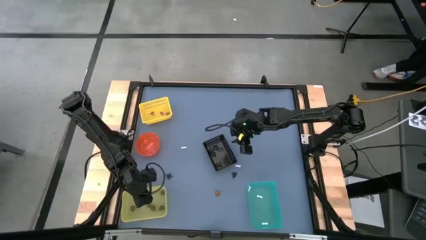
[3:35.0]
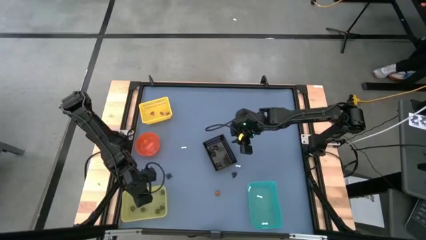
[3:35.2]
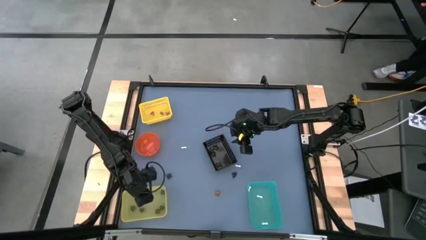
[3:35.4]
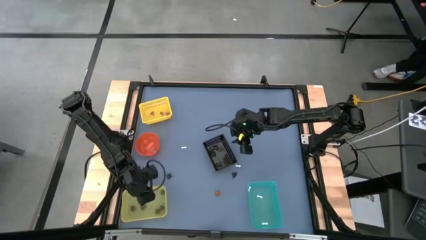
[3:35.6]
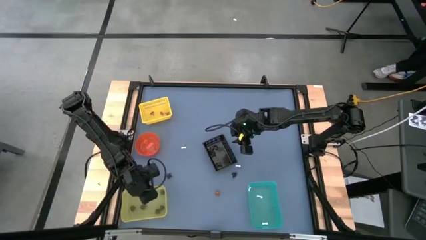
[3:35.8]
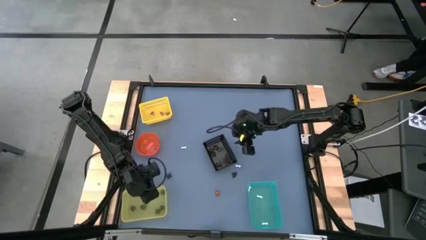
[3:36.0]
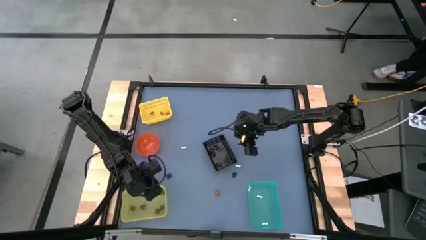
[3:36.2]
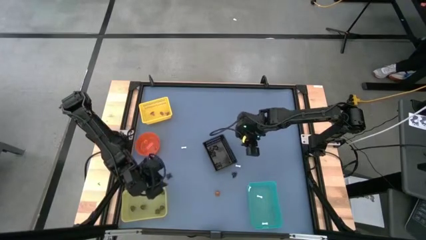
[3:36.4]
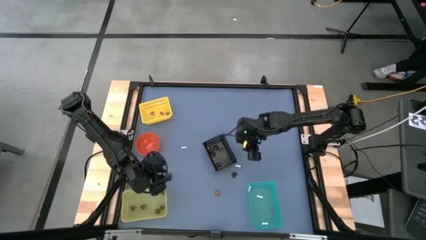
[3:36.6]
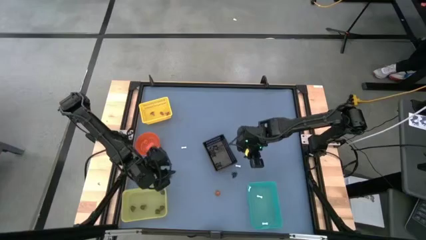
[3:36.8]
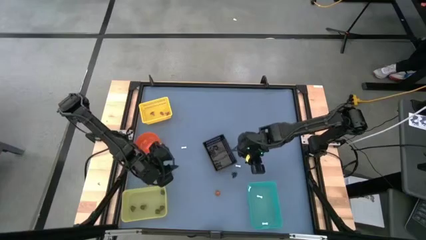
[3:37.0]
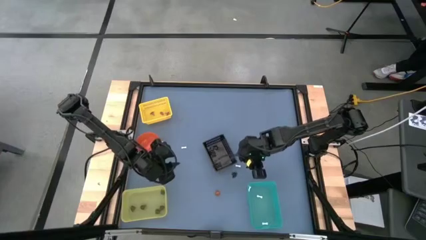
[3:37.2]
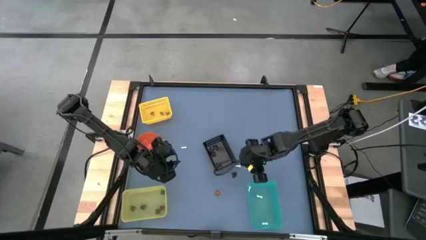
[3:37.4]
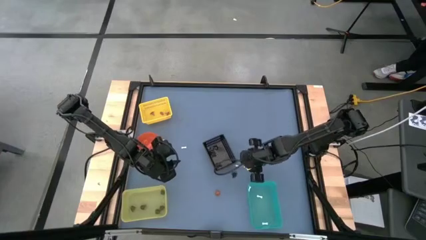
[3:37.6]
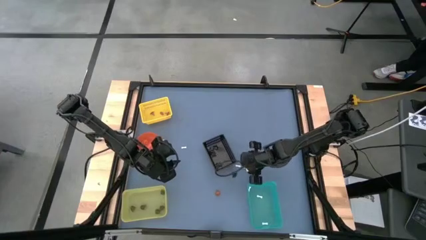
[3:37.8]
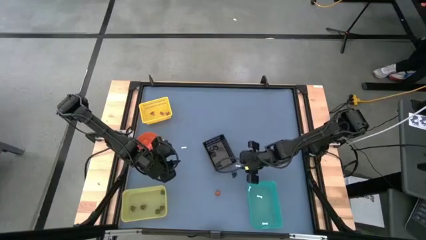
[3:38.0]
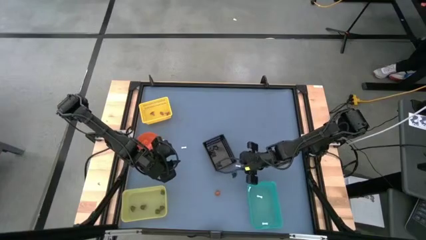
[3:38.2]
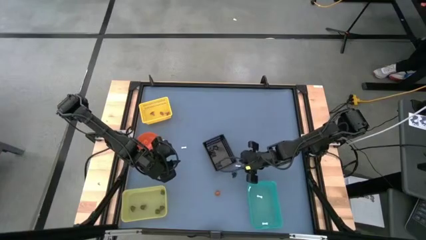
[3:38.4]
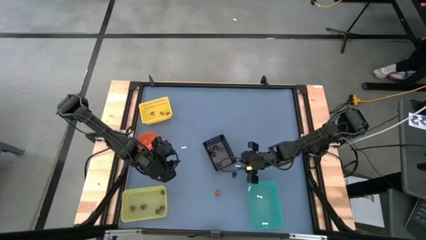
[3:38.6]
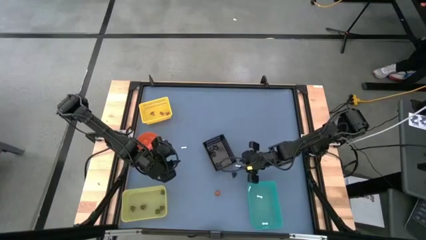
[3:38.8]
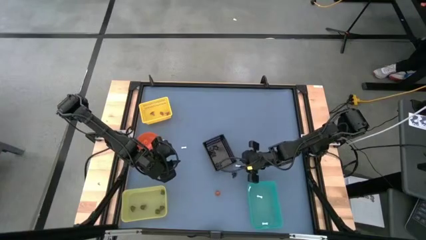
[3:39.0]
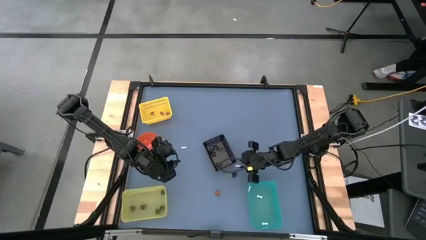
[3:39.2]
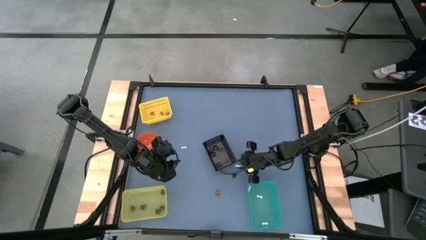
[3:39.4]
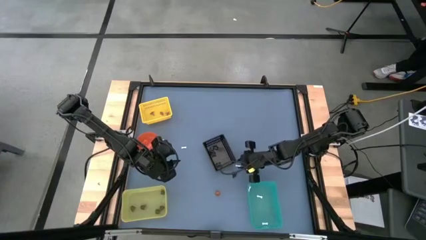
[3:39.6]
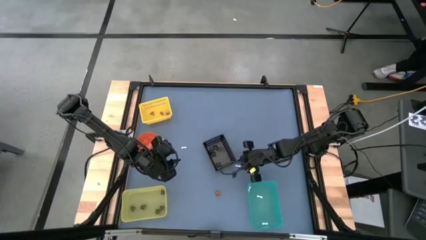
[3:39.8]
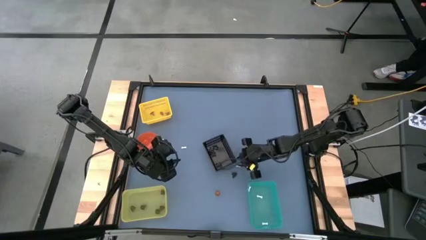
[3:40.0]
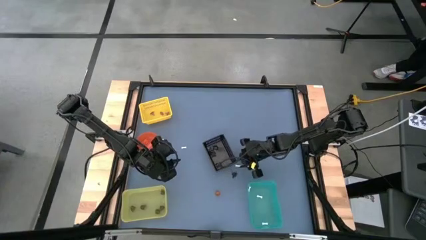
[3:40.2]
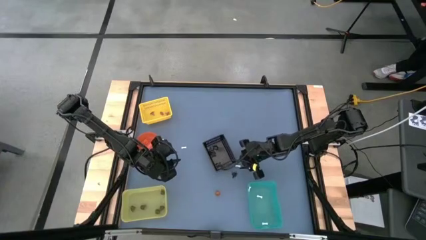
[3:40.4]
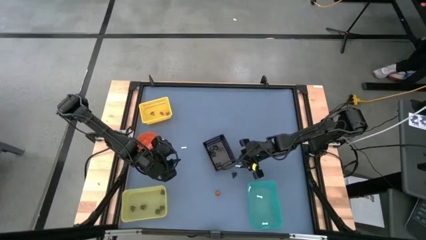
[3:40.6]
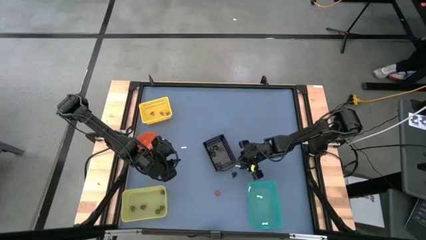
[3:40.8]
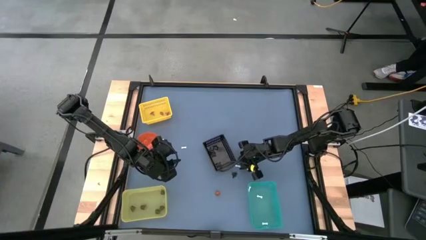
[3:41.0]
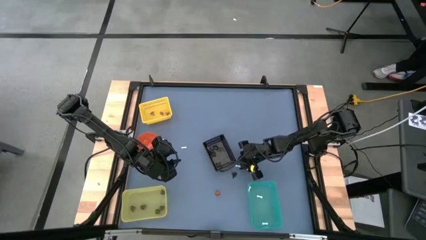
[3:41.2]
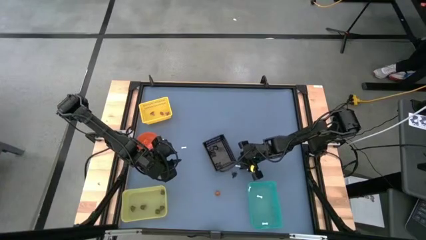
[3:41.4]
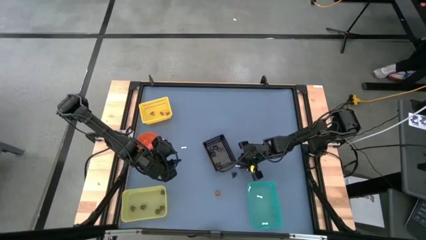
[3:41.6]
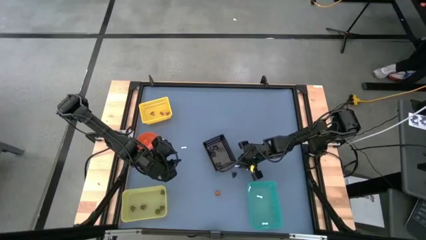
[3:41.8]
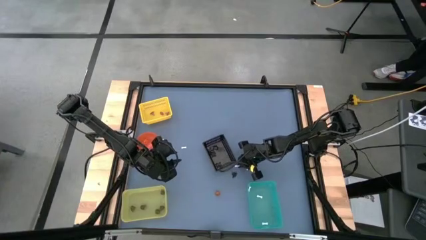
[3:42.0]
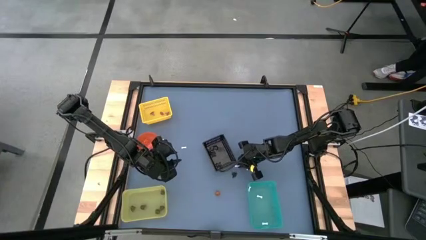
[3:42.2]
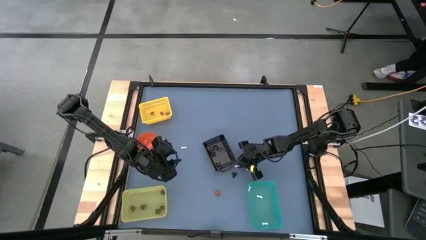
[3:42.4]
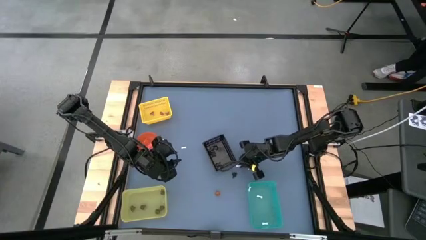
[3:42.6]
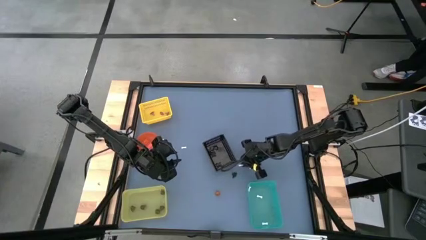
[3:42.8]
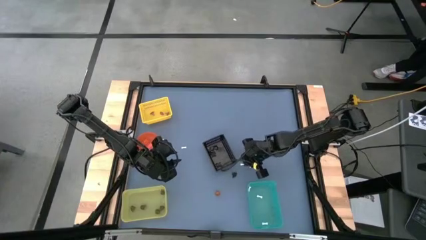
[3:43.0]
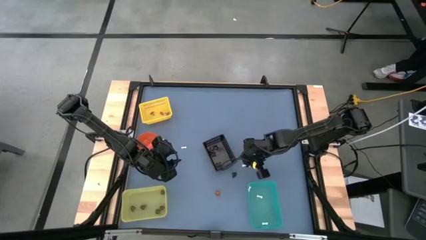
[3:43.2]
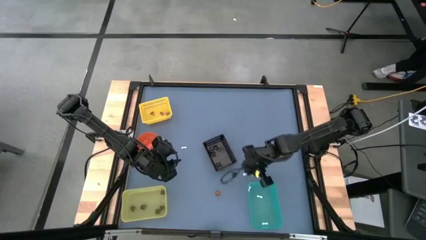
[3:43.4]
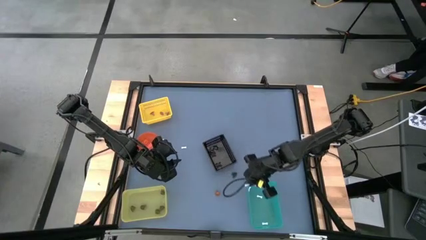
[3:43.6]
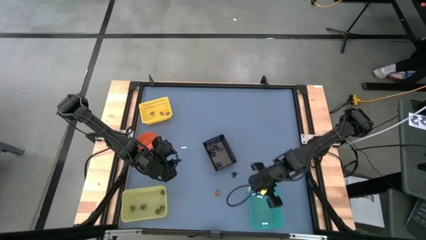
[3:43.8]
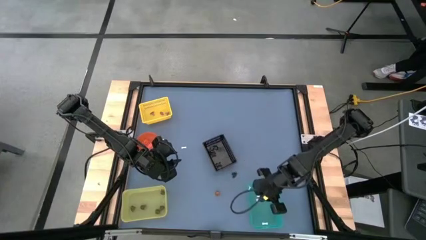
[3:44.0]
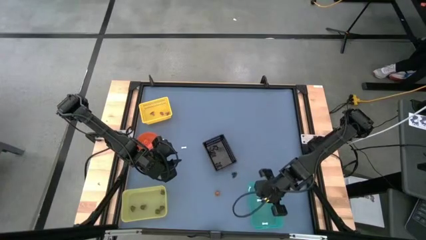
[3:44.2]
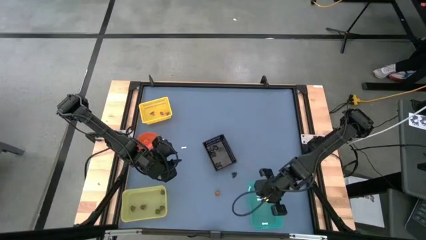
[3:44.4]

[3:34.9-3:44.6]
Task: Sort Halloween decoration
Put the white bone toy into the green bin

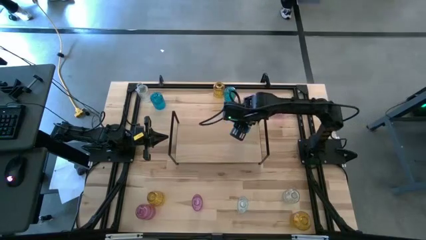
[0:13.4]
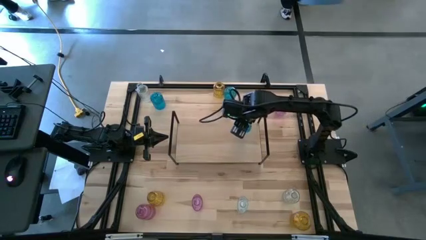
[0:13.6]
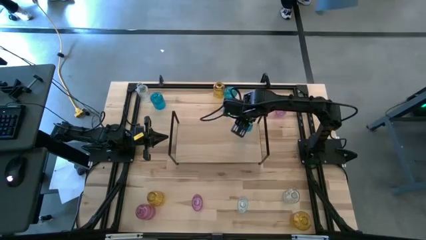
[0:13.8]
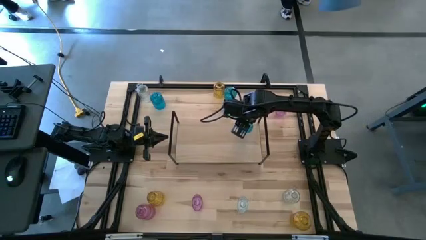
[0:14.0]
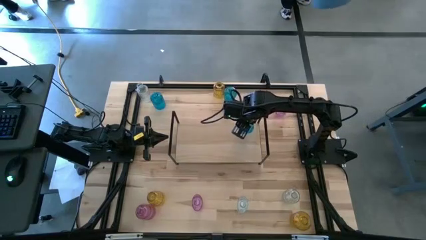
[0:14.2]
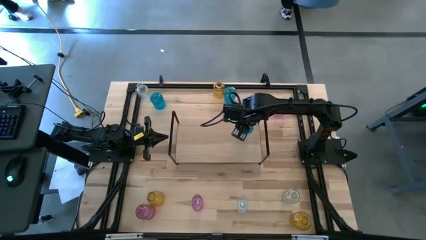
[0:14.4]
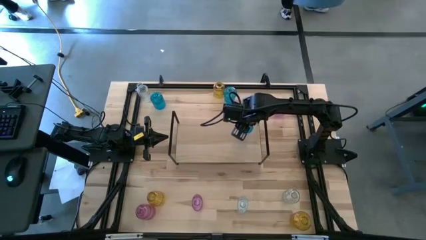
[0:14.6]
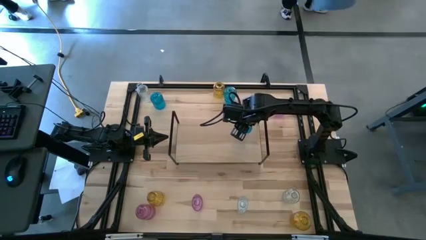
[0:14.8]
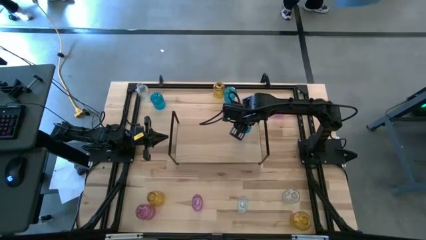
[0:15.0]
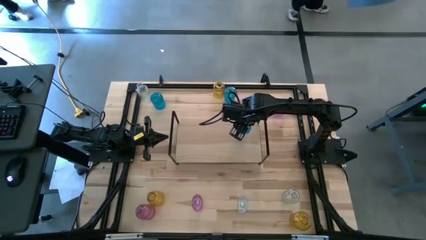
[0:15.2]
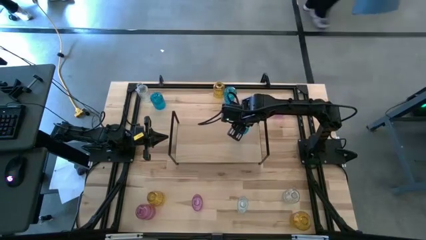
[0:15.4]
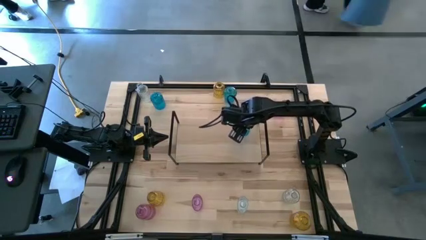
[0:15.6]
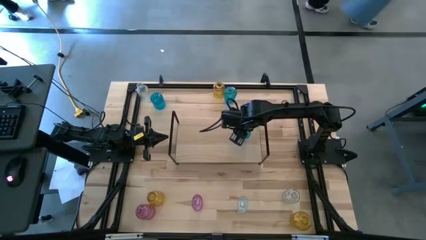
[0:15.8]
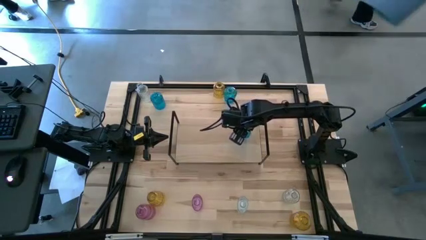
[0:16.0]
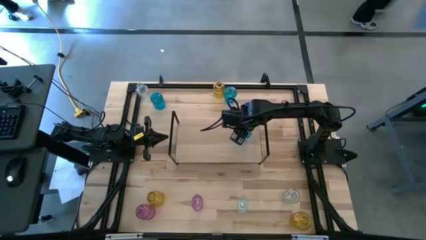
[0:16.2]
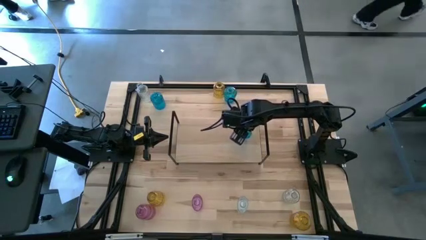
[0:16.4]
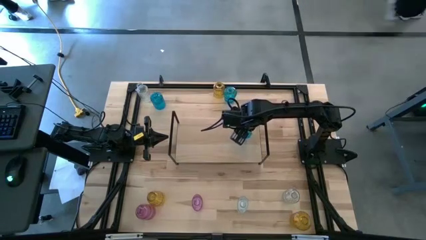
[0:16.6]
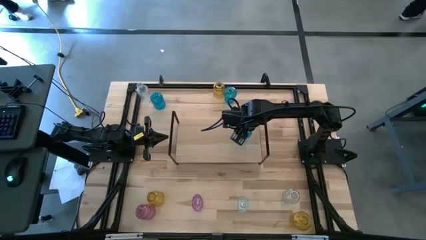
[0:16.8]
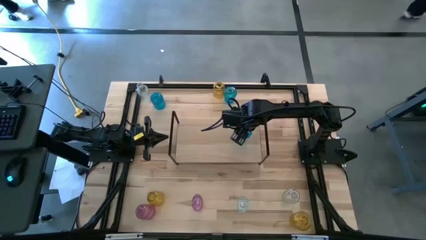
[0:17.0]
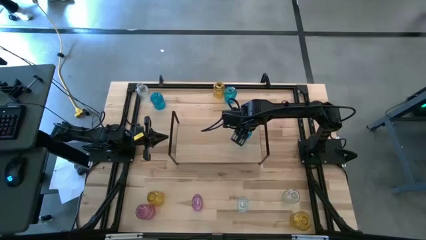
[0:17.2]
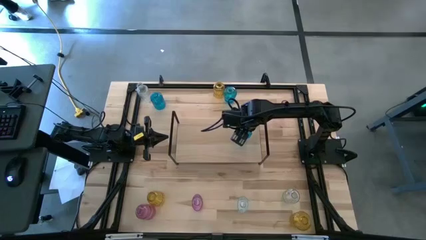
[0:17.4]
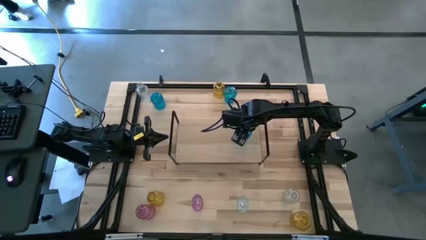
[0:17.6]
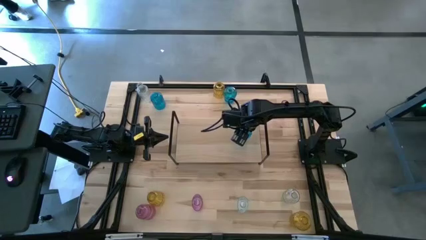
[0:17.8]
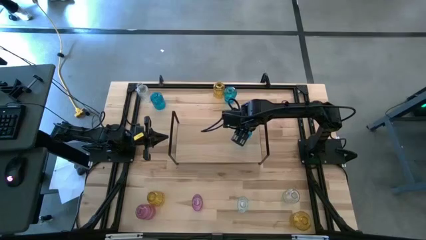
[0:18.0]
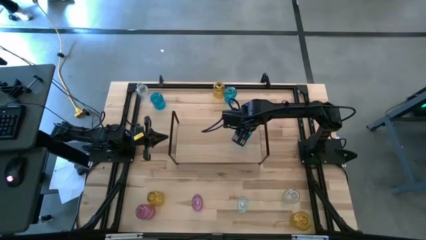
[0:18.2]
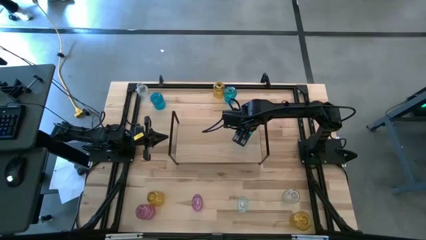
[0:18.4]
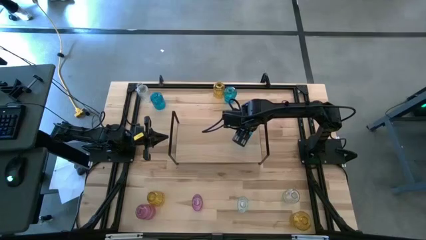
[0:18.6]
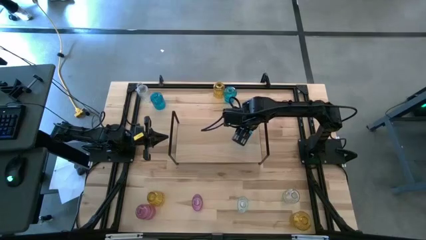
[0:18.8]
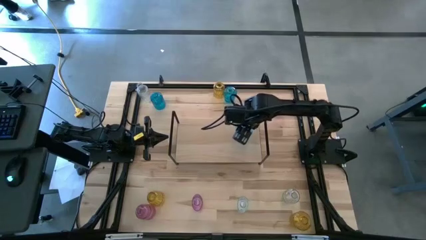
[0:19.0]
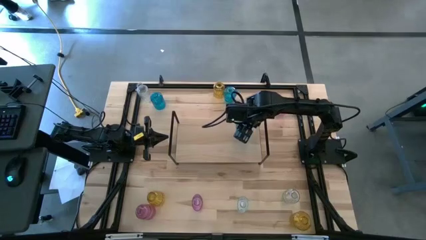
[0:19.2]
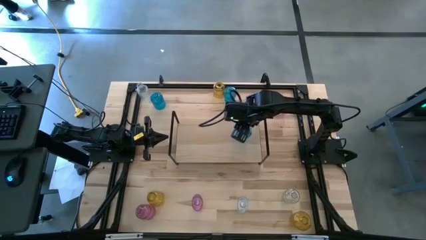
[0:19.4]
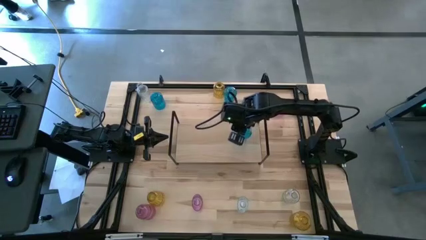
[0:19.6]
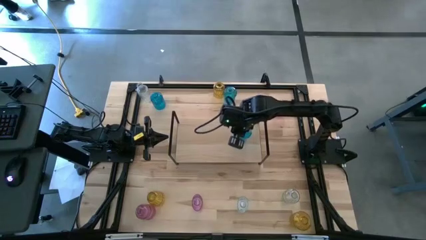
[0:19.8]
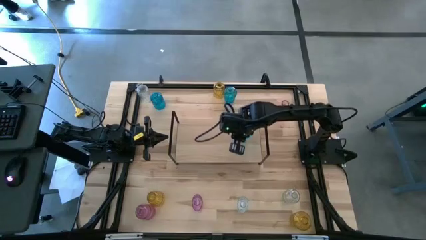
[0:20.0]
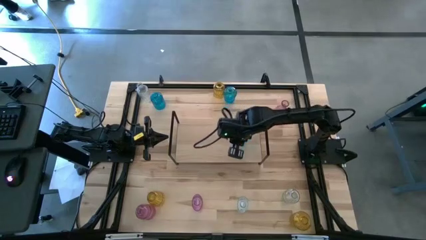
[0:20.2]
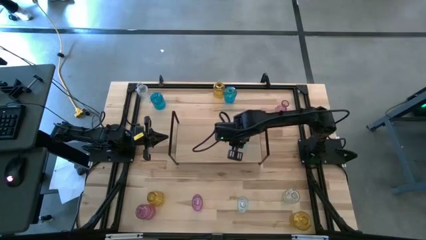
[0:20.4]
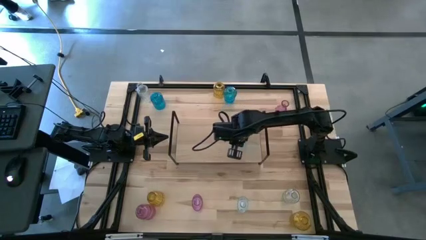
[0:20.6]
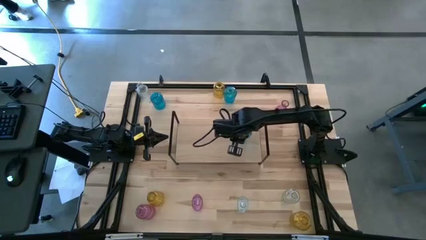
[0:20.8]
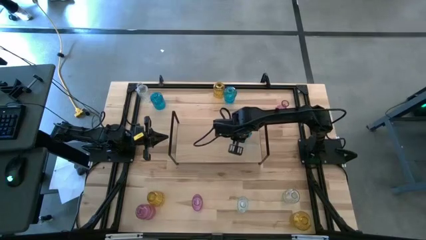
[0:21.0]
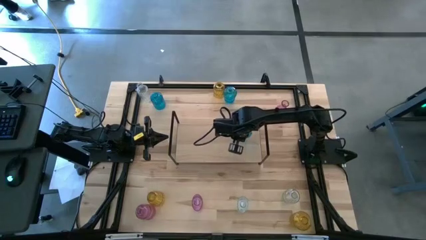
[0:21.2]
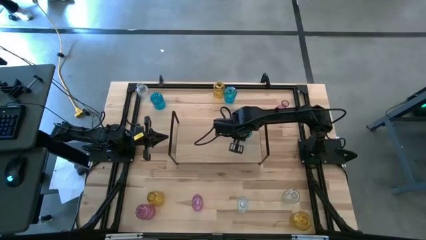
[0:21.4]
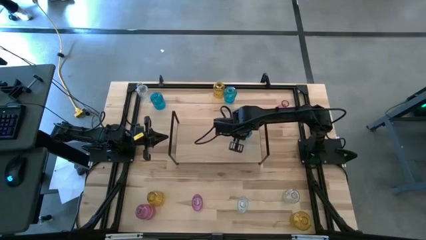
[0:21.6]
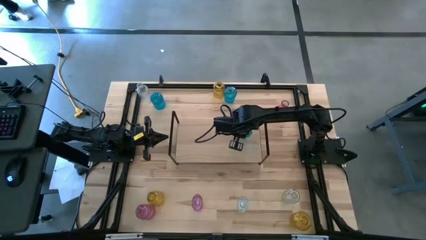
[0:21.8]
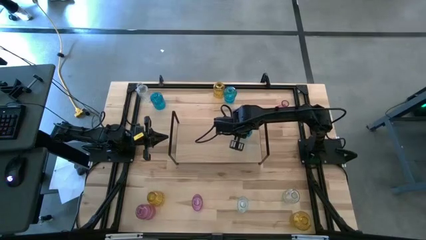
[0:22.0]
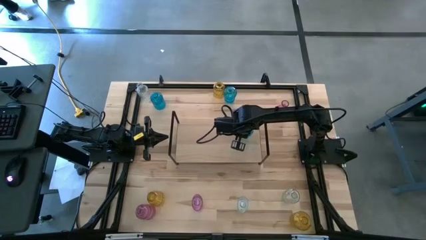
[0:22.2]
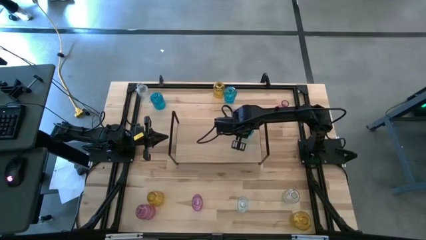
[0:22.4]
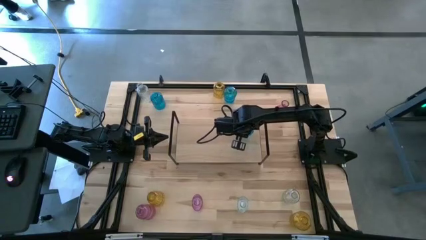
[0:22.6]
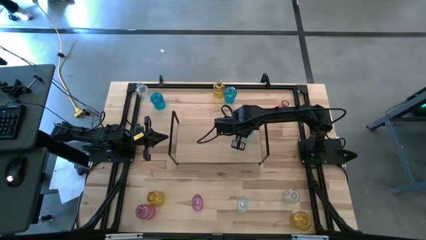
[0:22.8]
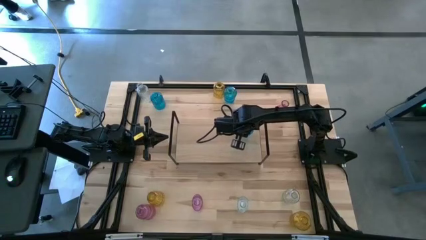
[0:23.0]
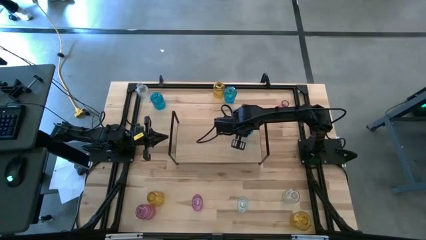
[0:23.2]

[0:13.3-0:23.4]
Task: sort vases onto shelf
Put the right blue vase on the shelf
